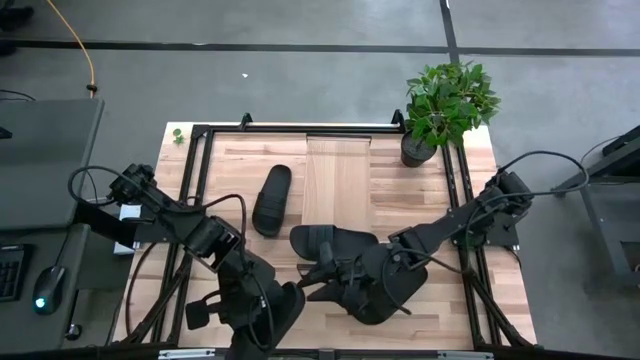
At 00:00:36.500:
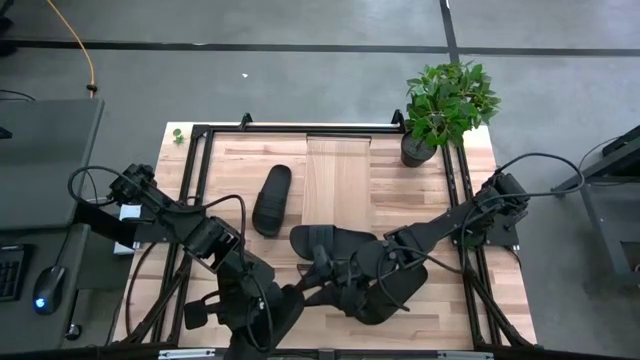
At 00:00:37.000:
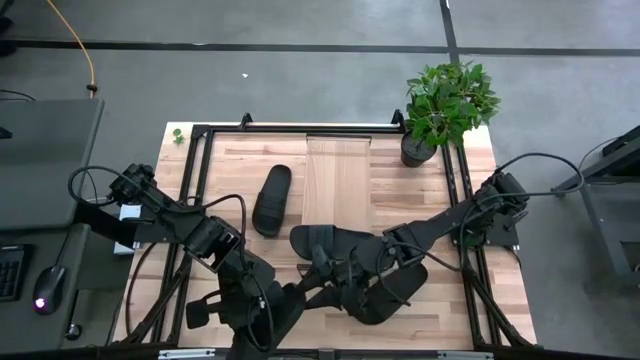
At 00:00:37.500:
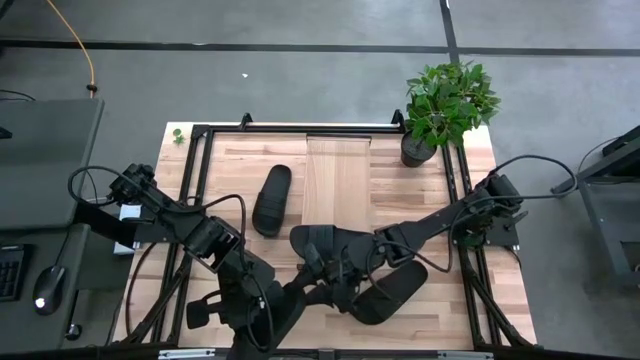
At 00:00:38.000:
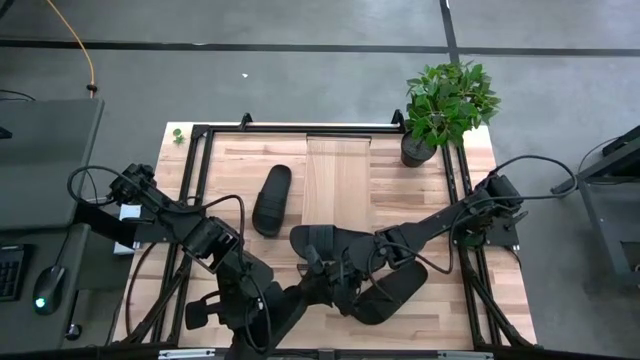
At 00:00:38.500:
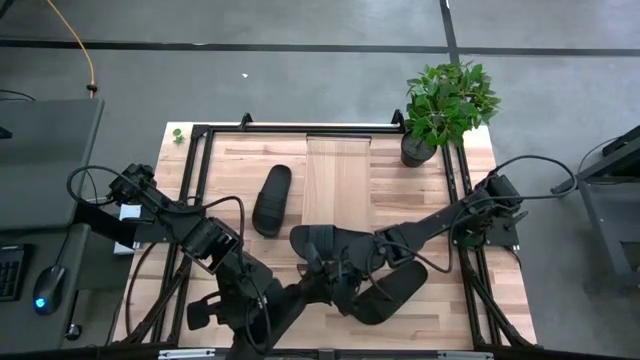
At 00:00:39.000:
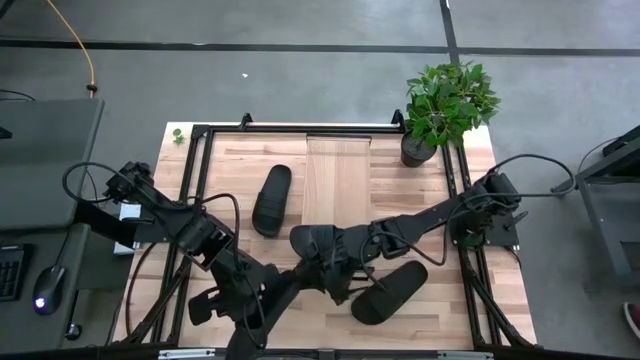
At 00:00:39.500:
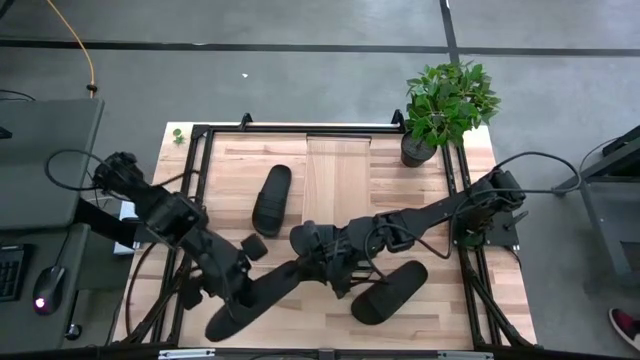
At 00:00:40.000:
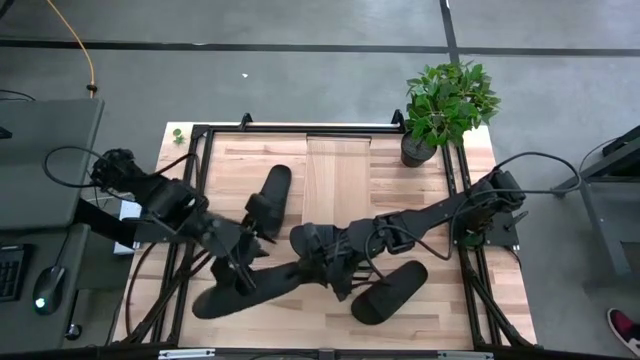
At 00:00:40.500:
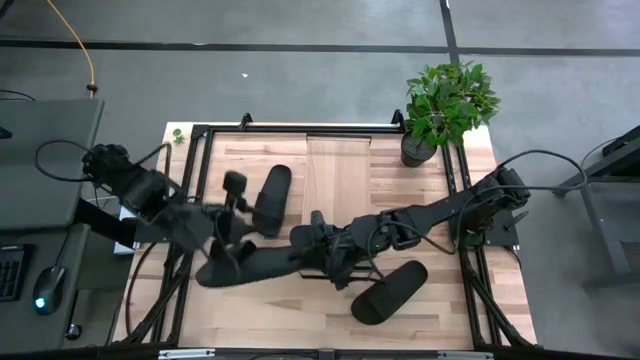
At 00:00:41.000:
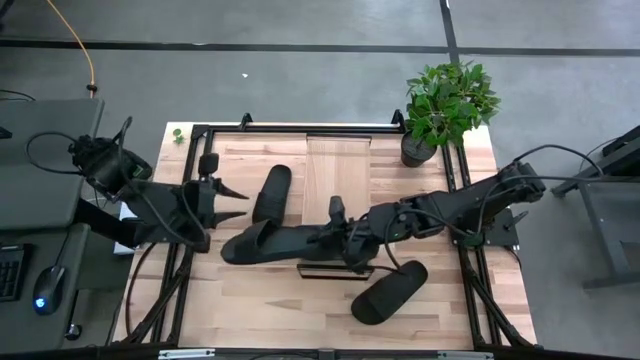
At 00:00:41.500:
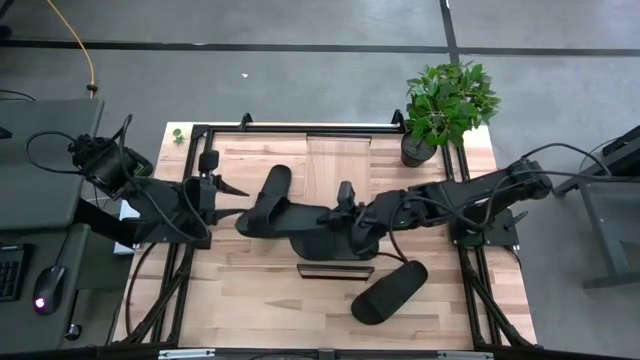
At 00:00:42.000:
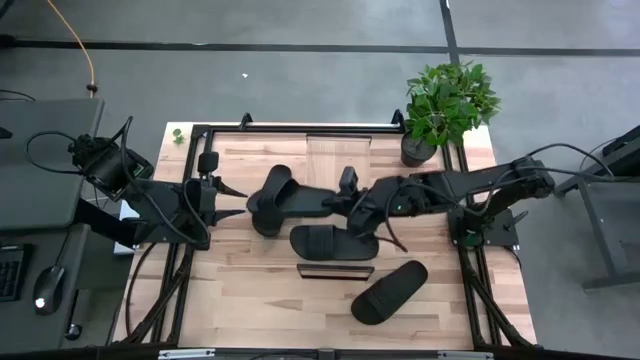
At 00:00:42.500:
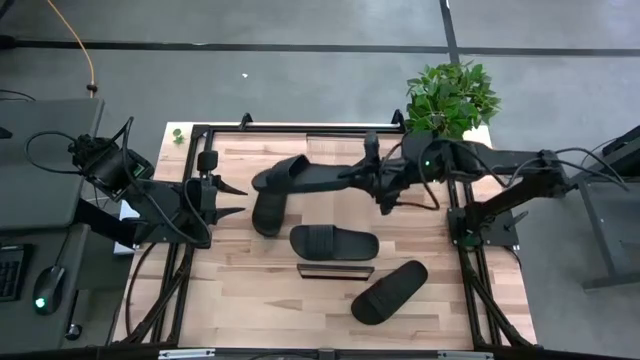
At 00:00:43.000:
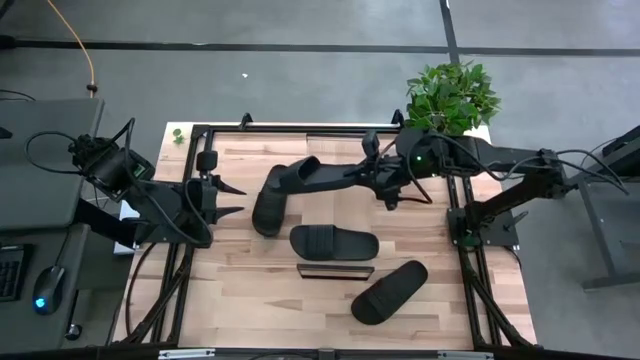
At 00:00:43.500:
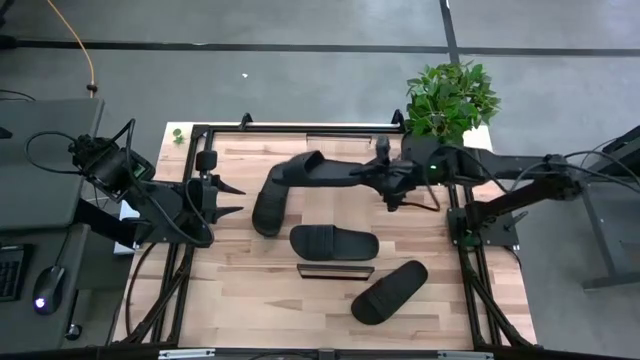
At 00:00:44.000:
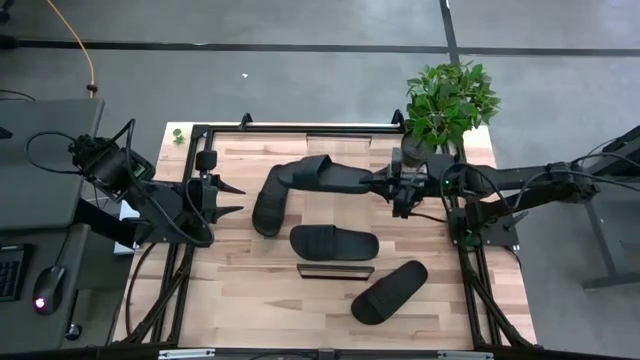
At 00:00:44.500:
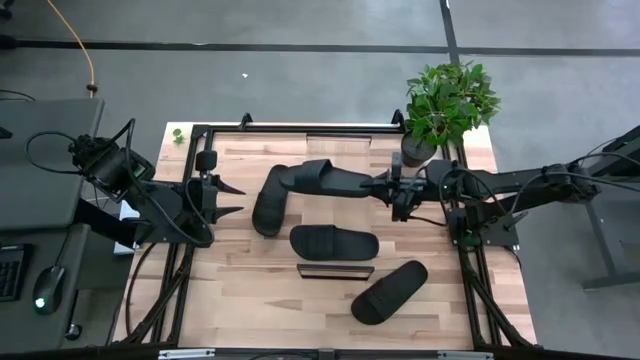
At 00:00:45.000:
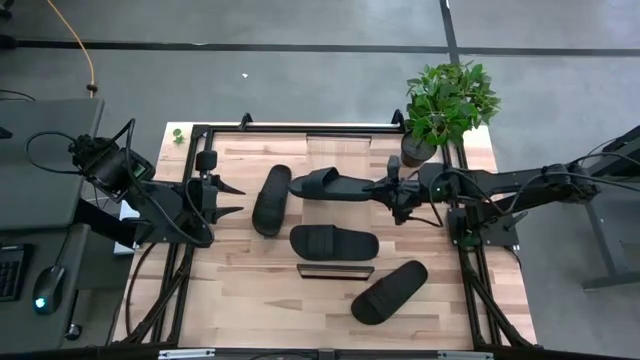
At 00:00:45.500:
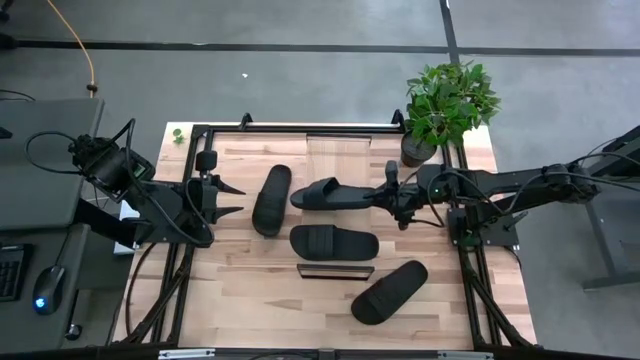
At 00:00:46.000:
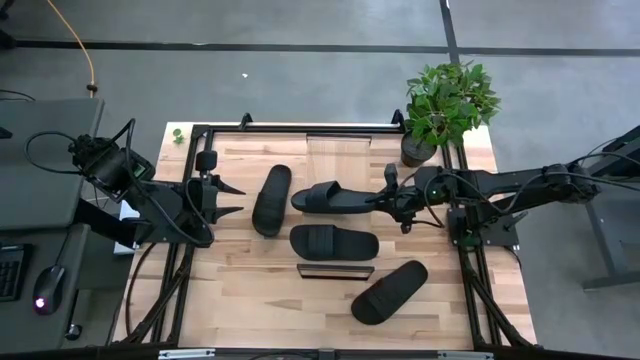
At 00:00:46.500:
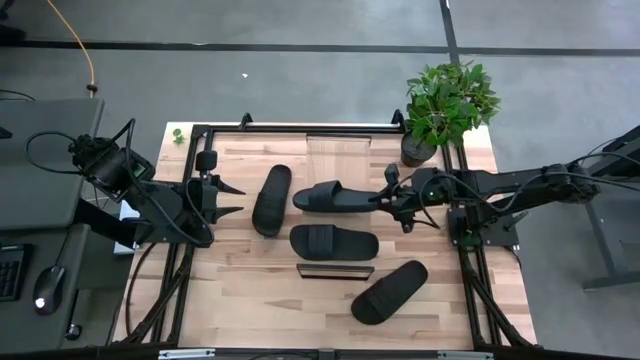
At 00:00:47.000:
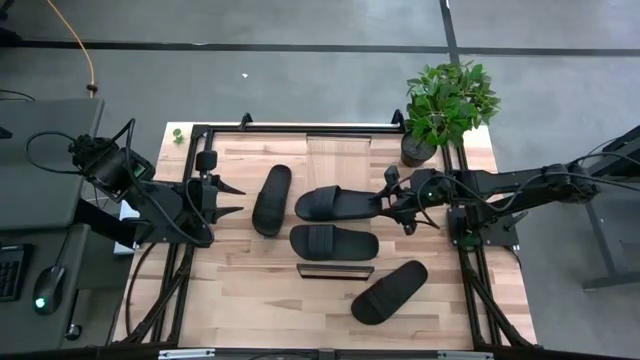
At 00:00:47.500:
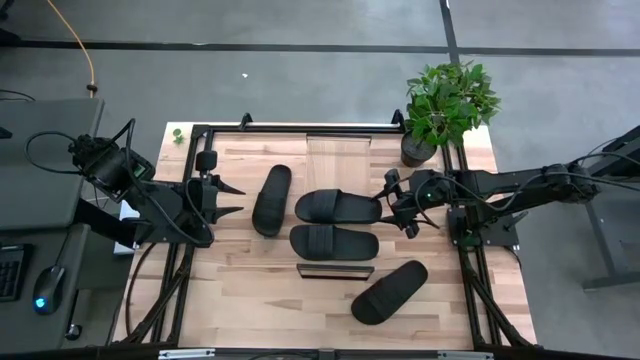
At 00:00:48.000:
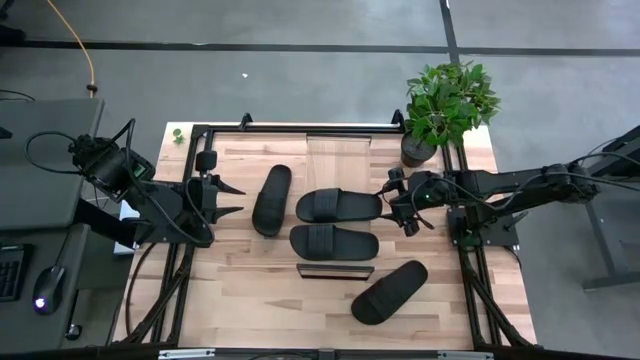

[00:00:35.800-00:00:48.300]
Task: Pick and place slides into the shelf
Put the bottom left black slipper on the shelf

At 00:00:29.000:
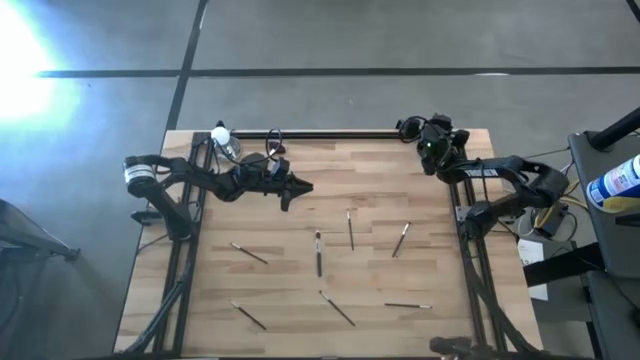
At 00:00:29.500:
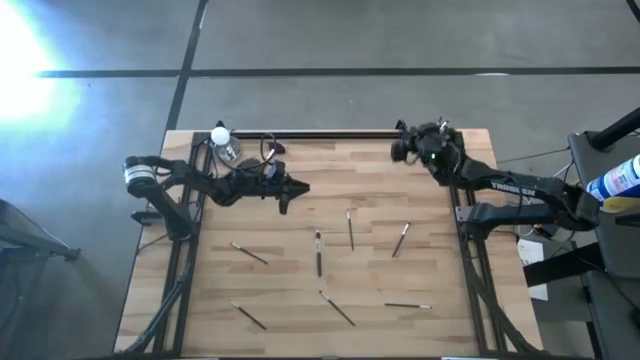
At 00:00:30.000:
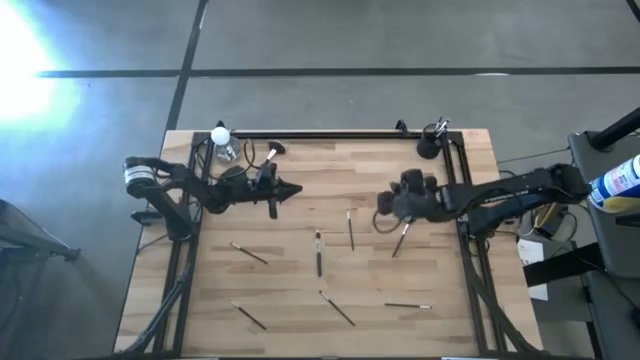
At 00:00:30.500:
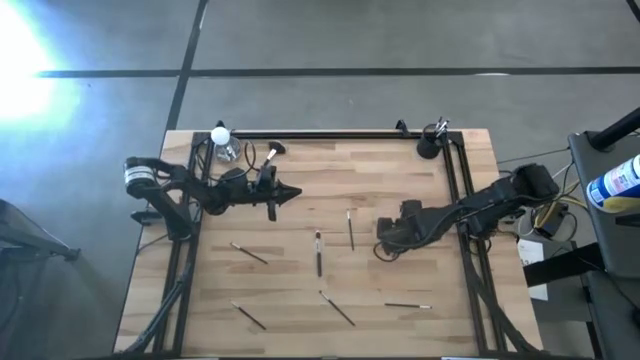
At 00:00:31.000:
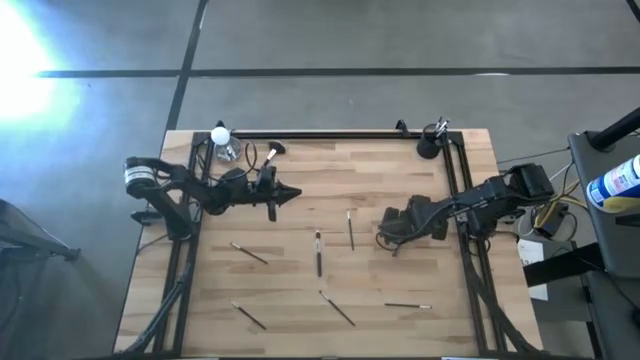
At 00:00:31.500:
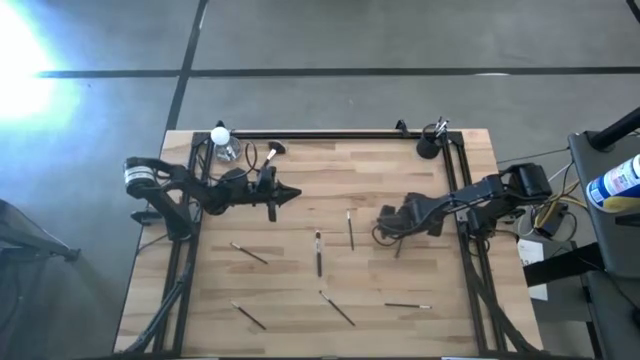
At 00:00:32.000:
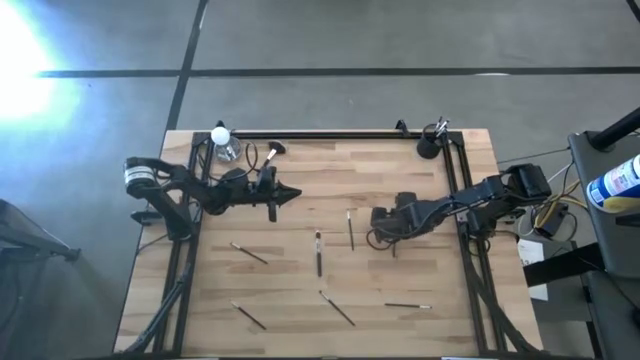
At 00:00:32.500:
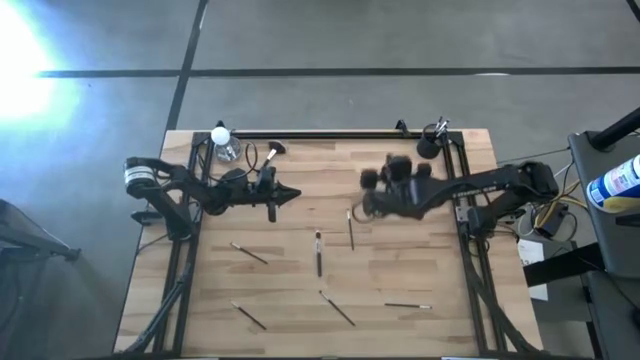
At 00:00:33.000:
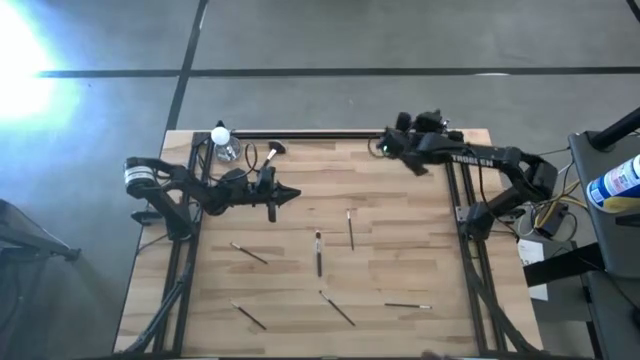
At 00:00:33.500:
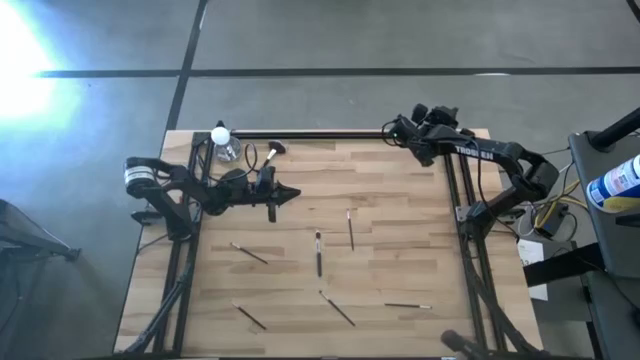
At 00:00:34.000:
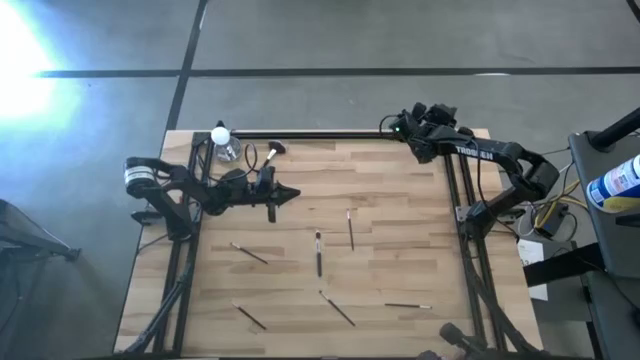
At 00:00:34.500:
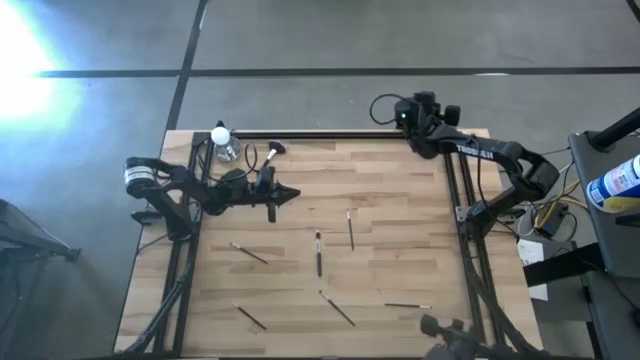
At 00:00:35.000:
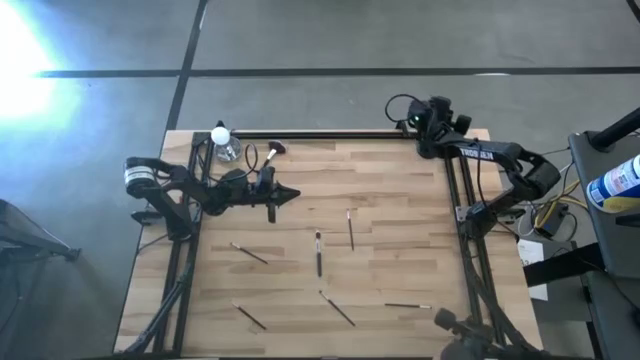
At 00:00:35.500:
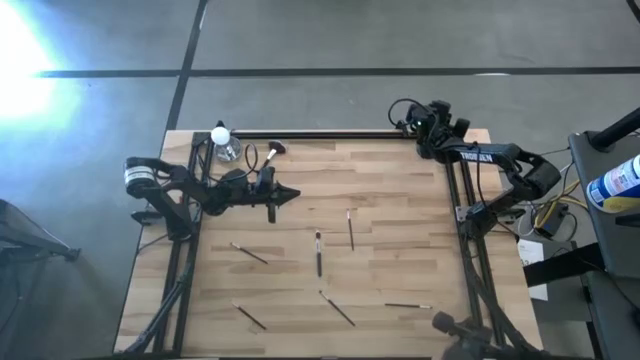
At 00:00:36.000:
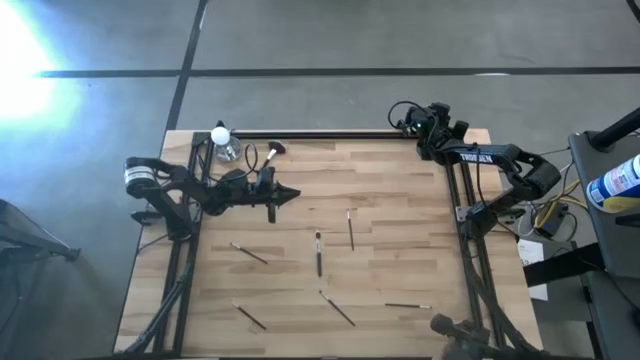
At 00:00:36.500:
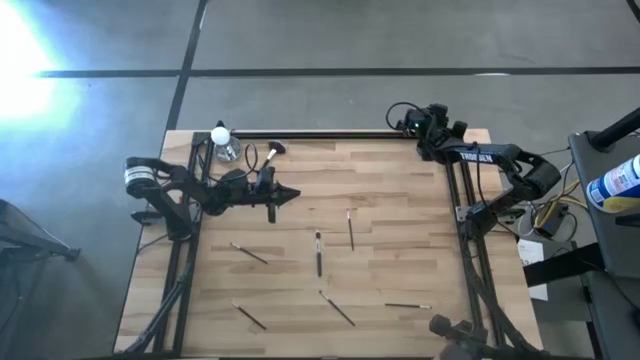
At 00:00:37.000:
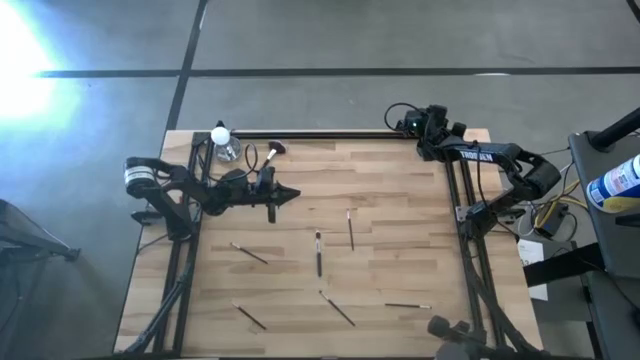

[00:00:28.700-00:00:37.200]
Task: Put items in baskets/containers
Put the foundation brush into the mesh organizer
